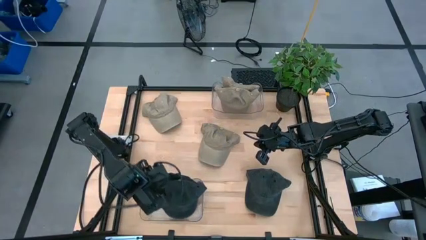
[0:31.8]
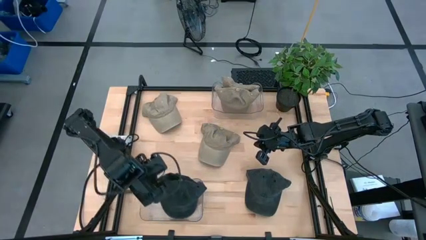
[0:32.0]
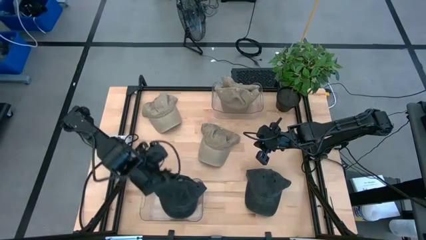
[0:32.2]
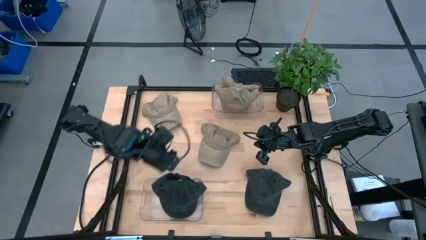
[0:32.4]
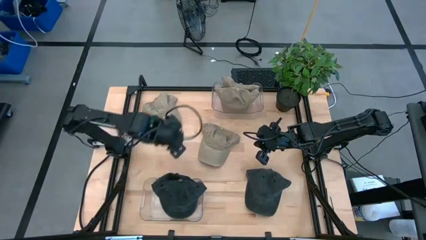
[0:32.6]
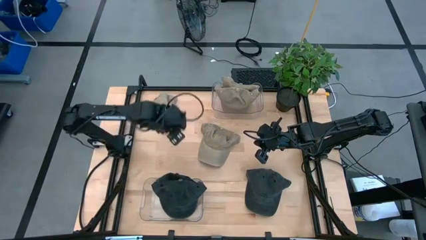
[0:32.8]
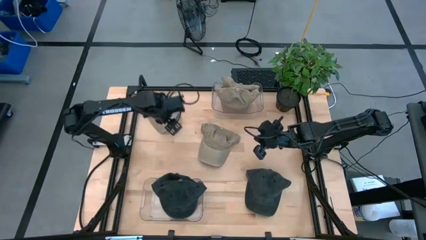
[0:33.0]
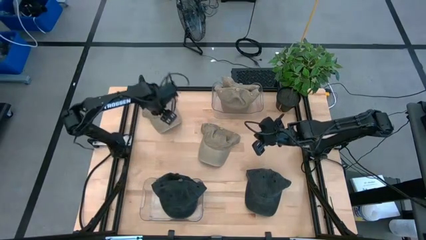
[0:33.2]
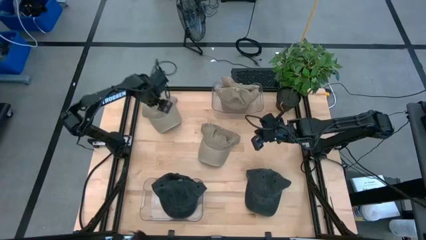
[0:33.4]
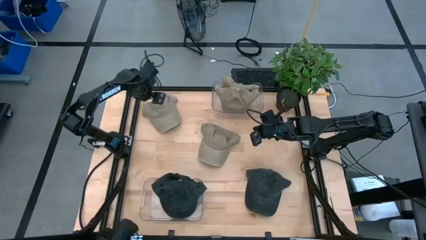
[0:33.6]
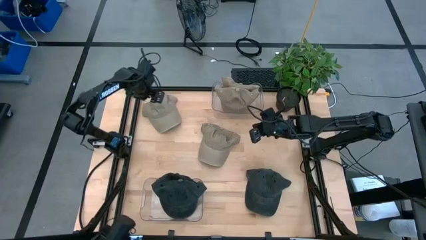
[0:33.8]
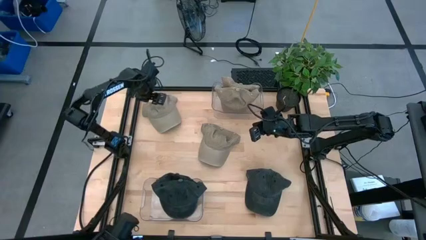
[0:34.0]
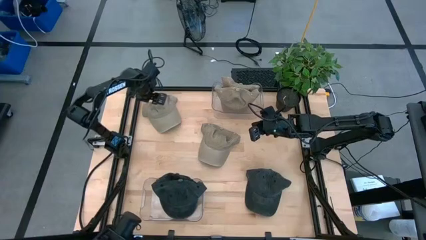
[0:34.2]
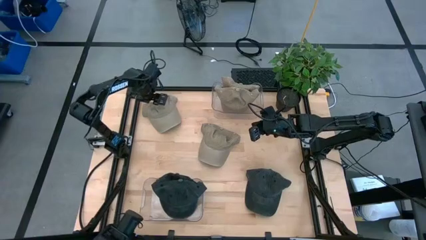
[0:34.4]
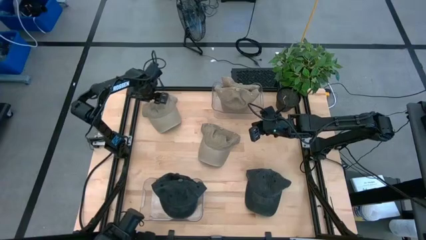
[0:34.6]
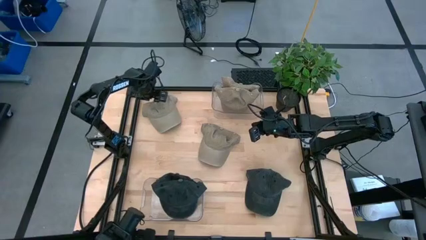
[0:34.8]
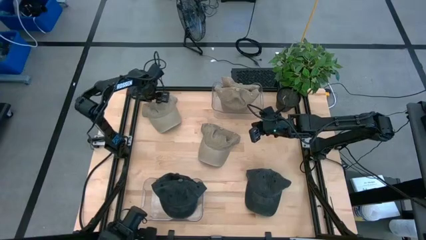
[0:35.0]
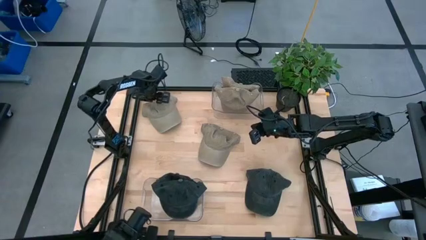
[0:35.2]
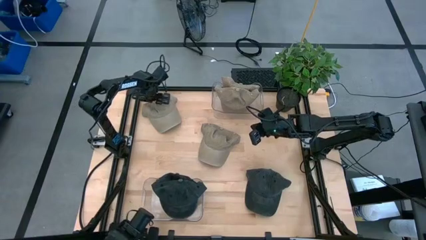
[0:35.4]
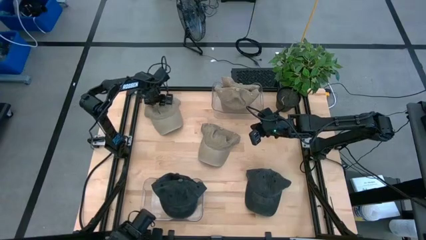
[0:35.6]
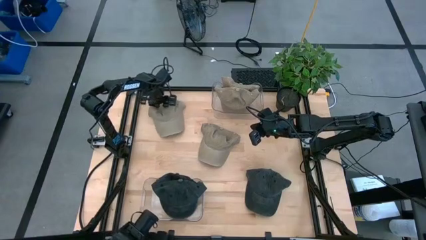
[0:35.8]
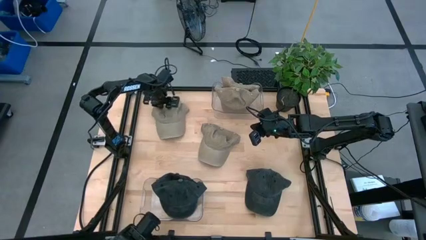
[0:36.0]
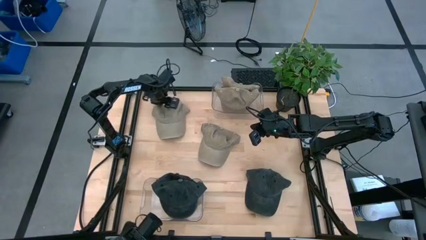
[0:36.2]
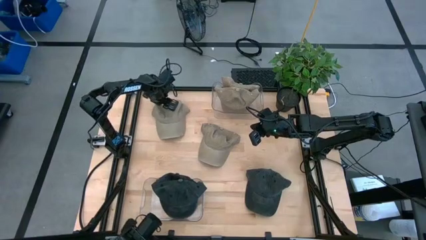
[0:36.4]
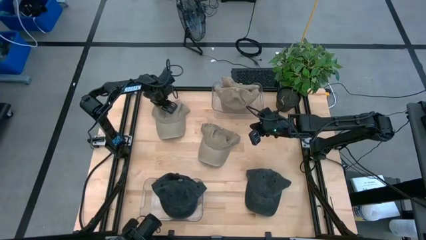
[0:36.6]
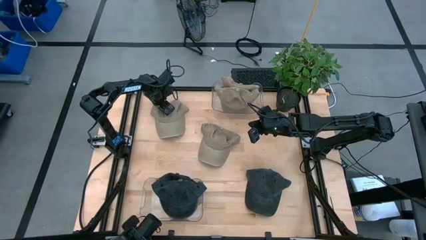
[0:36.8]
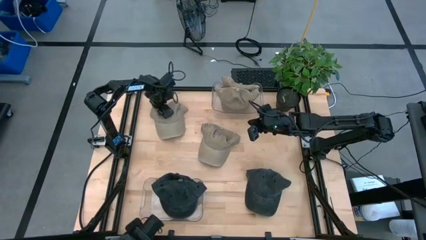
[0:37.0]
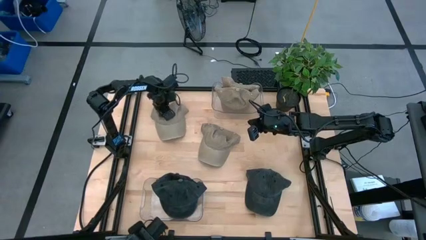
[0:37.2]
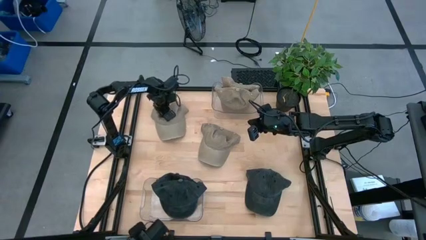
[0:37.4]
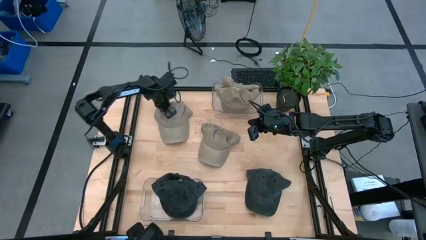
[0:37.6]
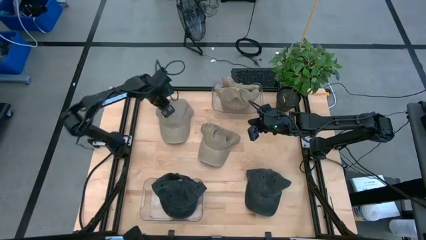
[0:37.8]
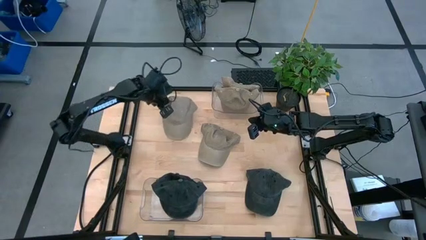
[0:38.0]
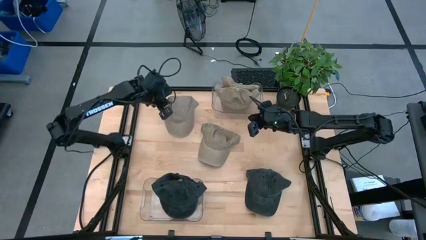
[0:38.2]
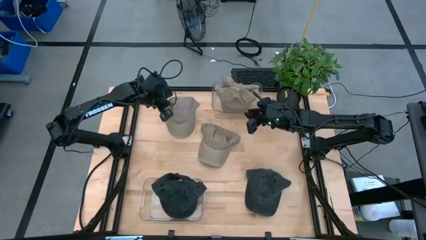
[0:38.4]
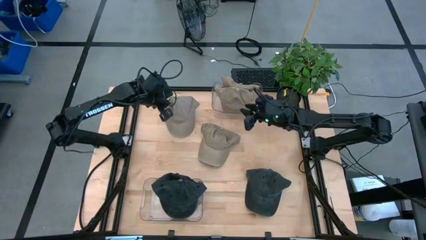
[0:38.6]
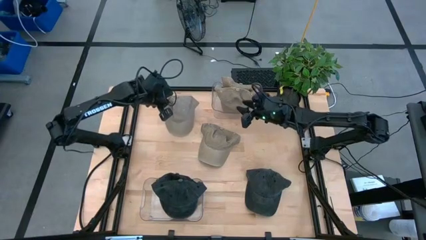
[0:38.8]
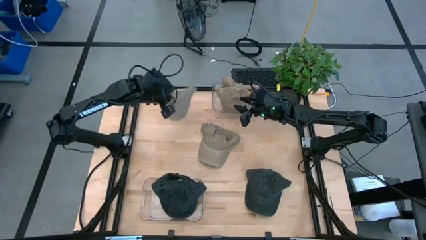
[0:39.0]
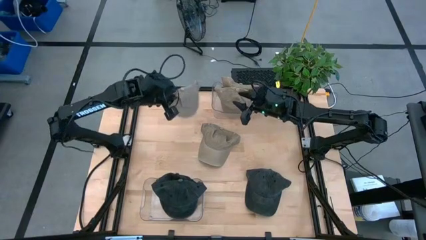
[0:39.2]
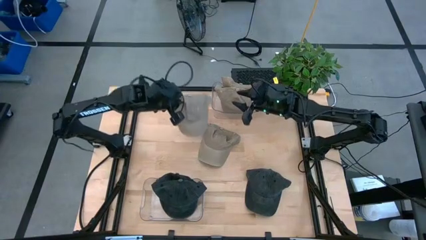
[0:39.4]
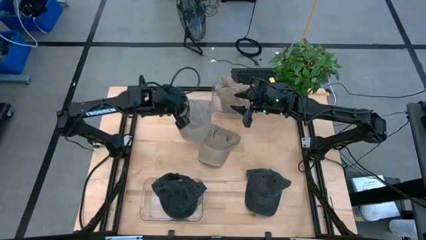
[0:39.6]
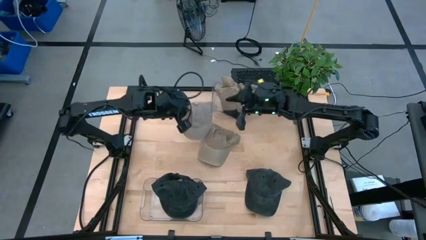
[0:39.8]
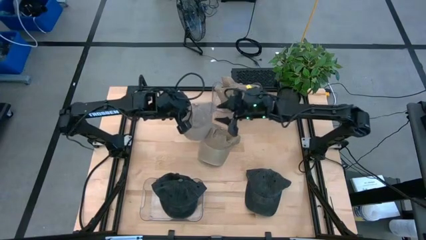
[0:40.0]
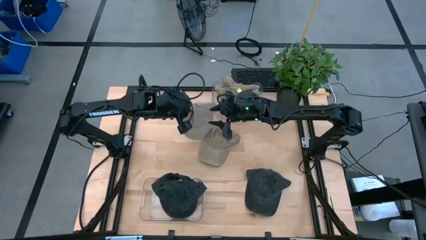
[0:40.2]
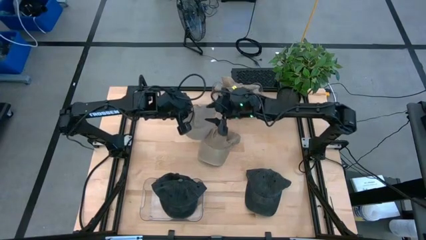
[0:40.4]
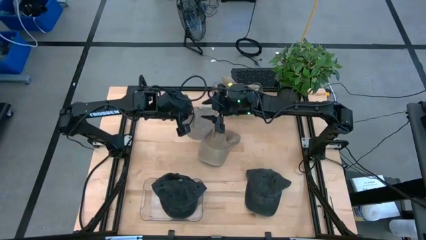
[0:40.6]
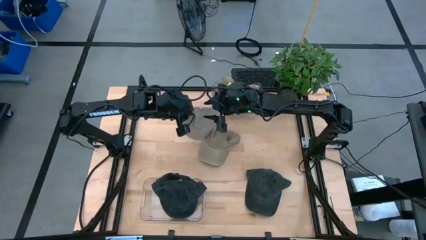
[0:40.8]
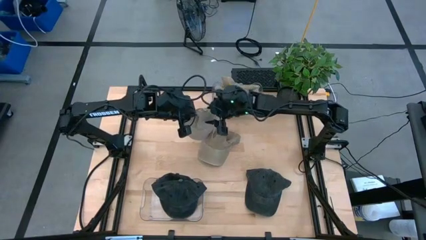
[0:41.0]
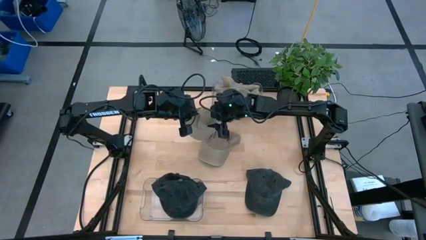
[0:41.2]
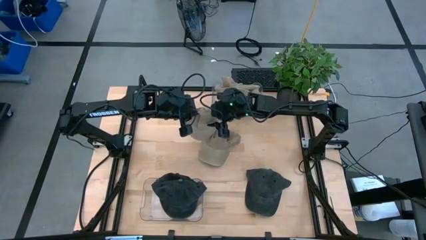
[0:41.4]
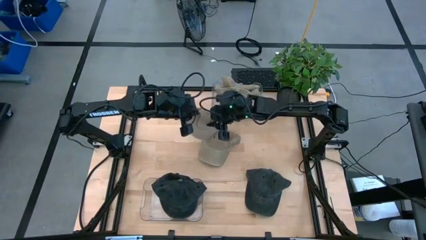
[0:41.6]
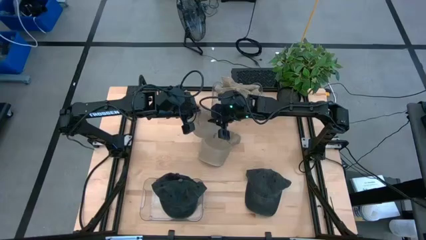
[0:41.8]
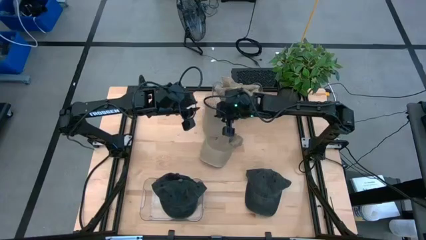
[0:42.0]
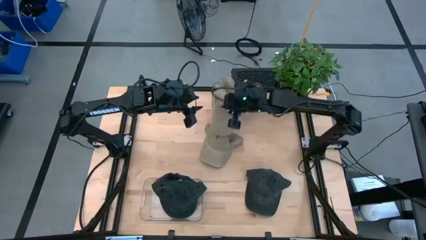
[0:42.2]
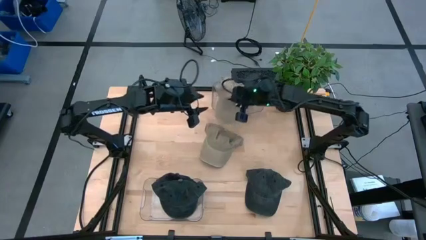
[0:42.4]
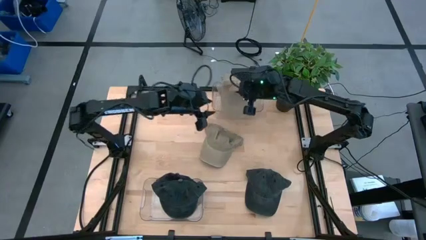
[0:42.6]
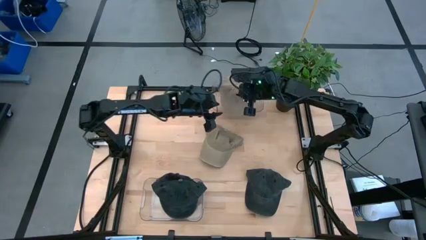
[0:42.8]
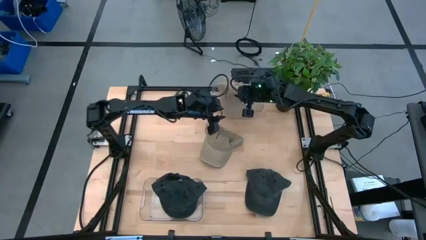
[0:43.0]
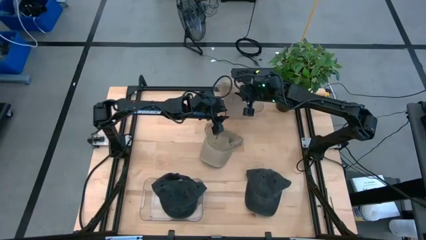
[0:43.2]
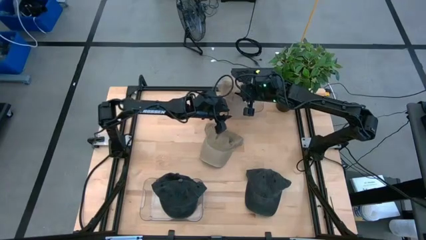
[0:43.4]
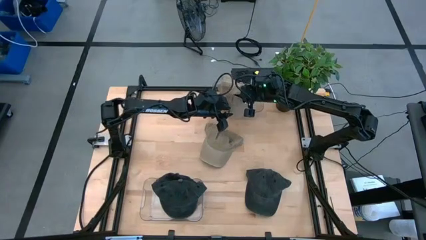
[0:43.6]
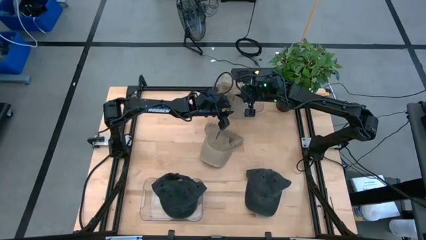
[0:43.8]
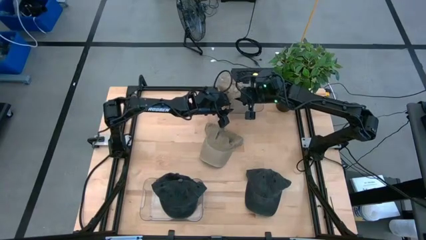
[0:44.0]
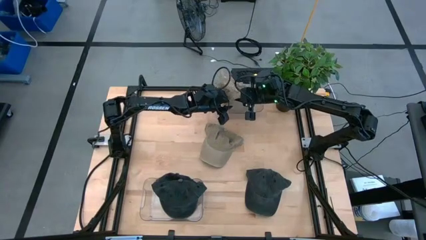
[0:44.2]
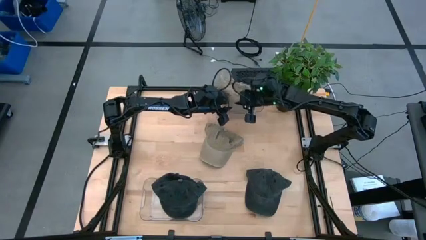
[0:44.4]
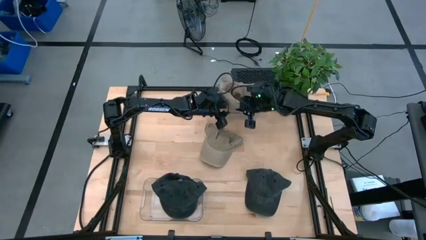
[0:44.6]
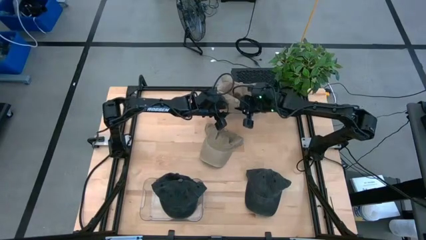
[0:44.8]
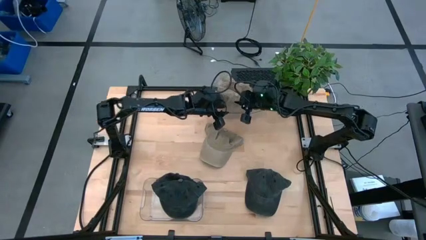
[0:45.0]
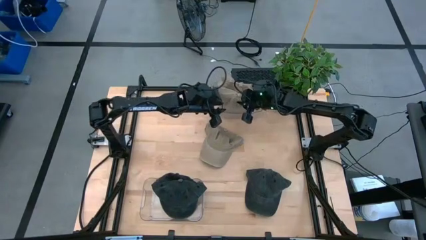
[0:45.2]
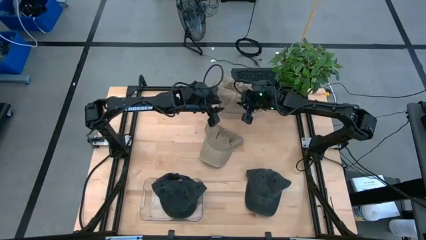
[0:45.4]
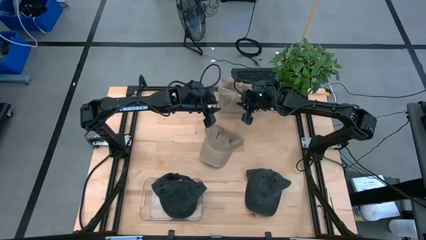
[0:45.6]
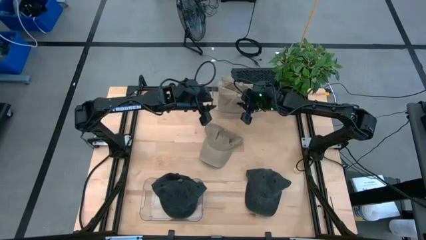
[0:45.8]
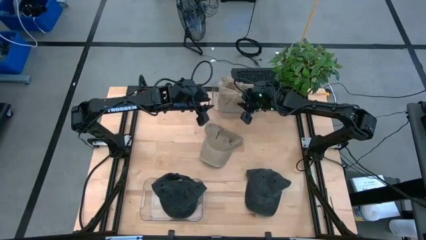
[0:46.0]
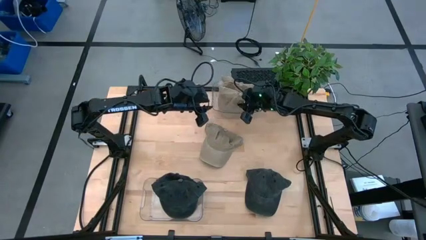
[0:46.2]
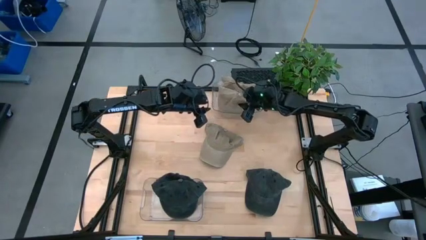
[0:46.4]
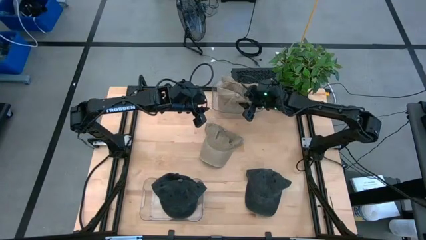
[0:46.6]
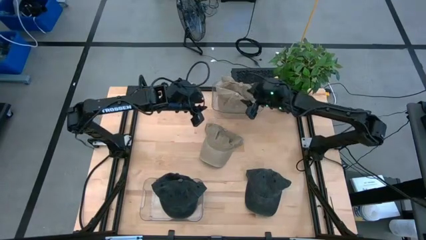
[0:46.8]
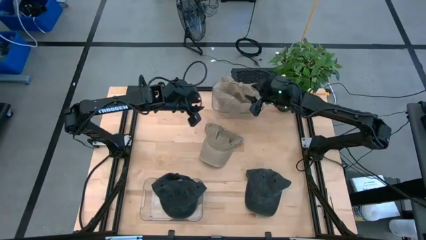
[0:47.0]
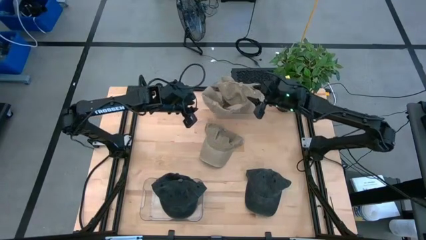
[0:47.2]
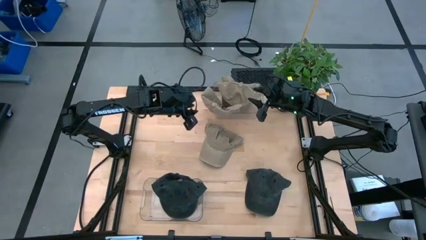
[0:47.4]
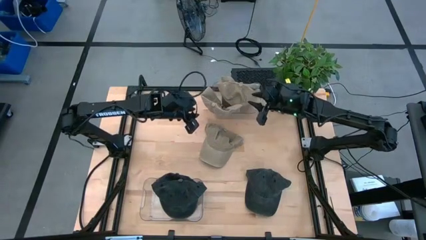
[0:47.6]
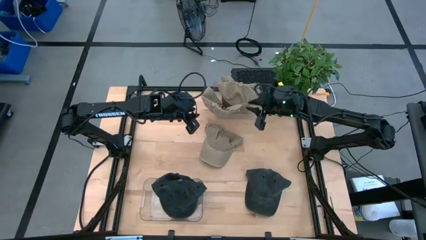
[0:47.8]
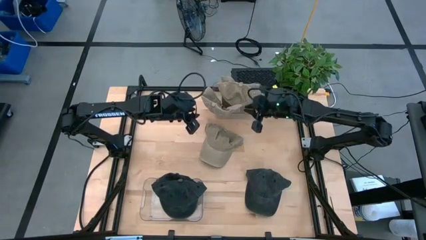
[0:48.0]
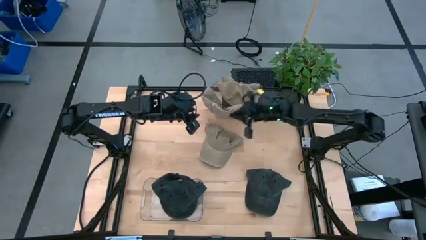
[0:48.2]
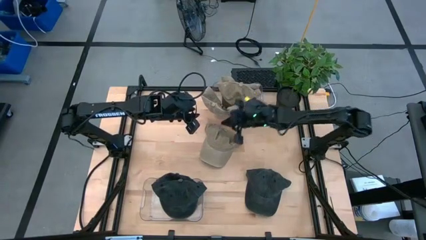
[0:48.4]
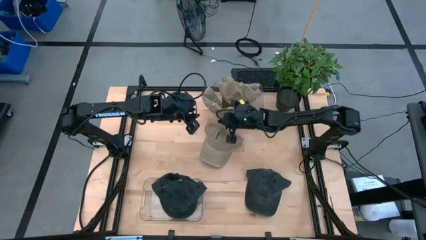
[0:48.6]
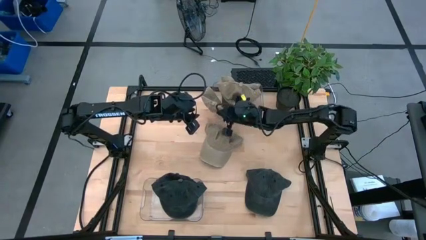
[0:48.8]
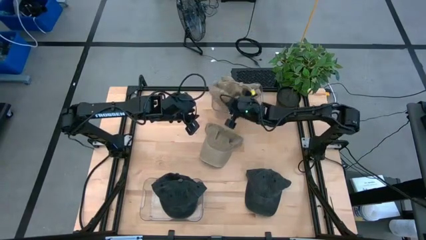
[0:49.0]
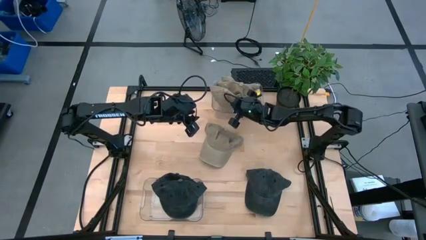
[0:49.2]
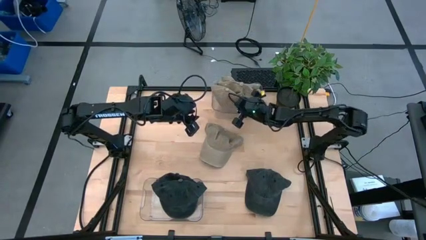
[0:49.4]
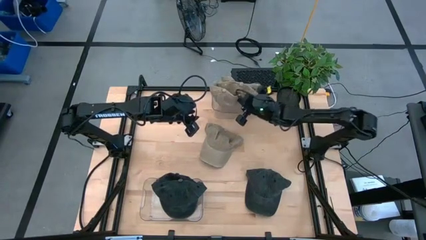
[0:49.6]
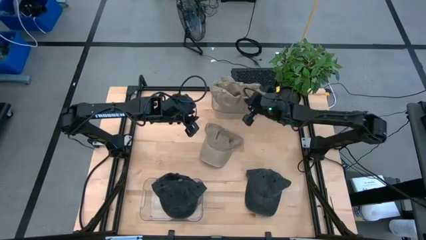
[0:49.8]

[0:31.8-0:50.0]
Task: Pick & Place hat
Put the brown cap into the top transparent bin
